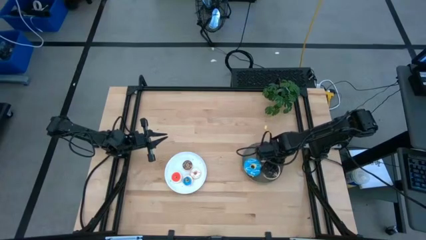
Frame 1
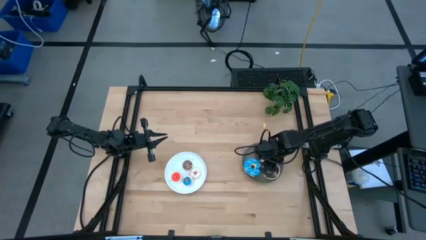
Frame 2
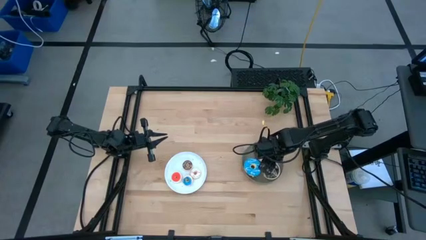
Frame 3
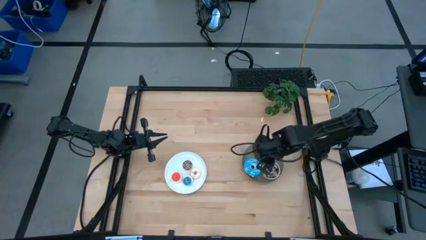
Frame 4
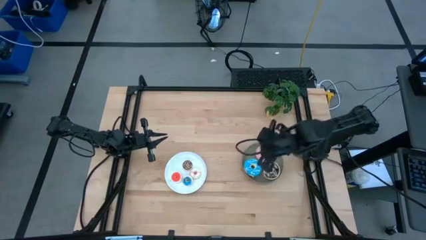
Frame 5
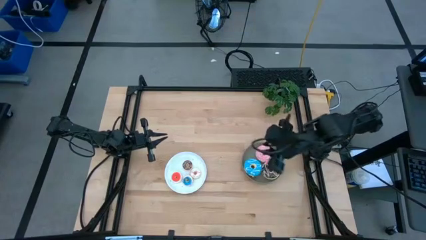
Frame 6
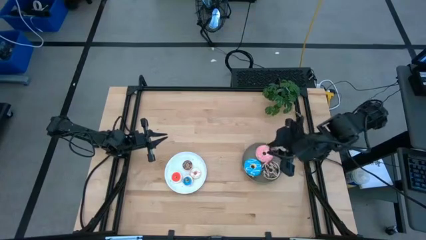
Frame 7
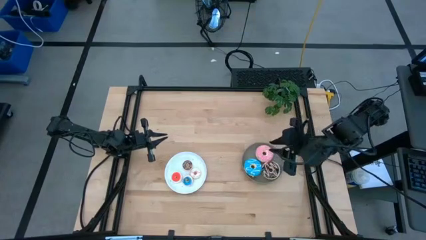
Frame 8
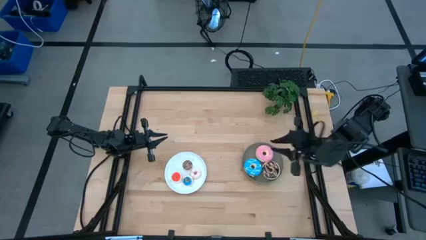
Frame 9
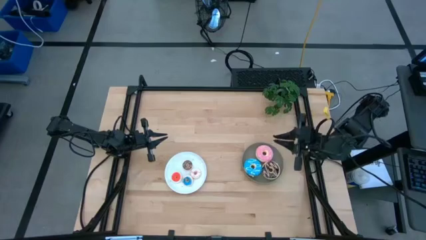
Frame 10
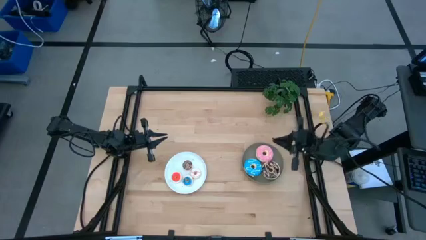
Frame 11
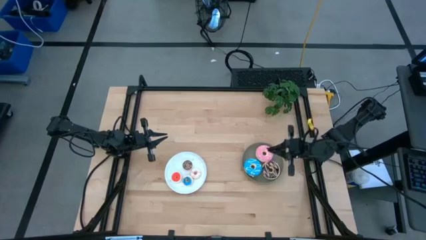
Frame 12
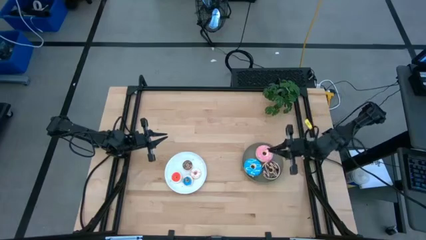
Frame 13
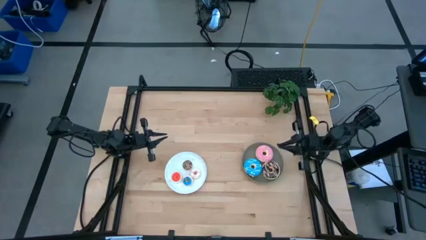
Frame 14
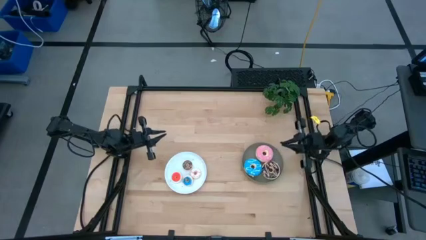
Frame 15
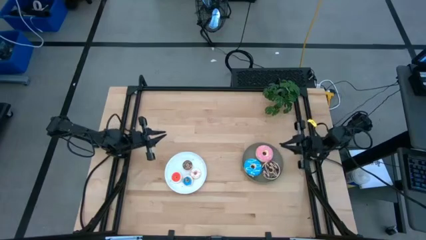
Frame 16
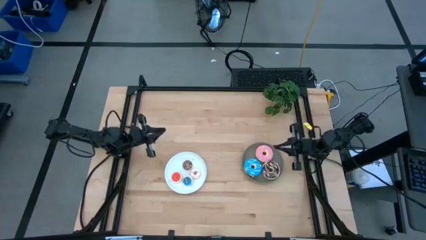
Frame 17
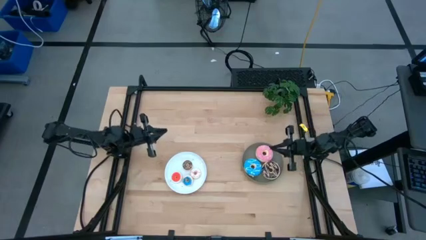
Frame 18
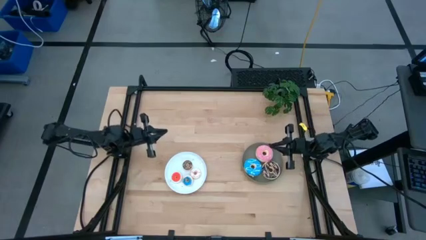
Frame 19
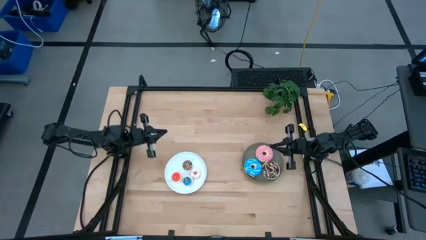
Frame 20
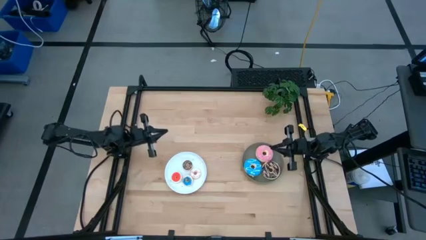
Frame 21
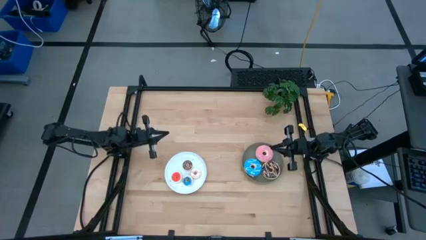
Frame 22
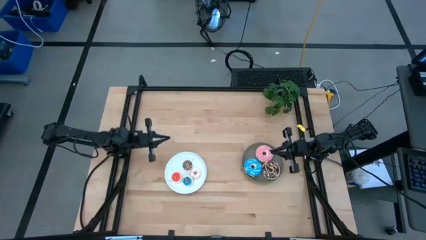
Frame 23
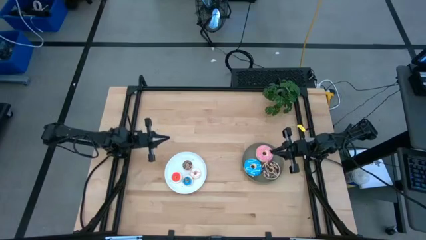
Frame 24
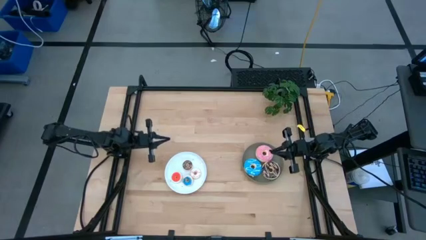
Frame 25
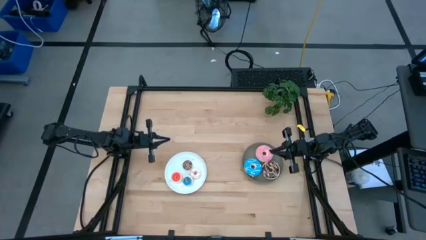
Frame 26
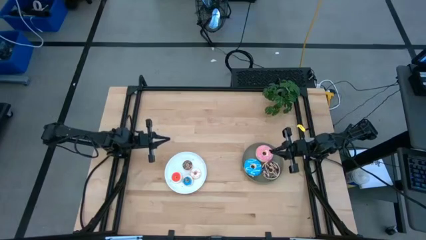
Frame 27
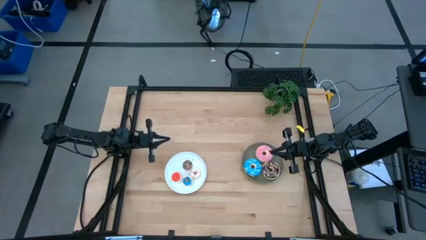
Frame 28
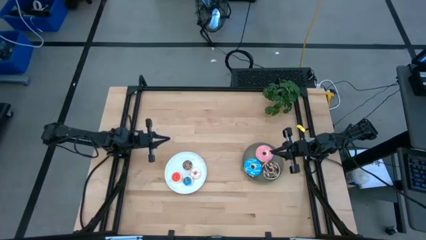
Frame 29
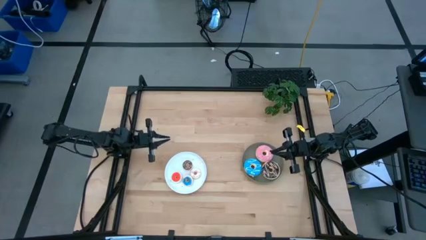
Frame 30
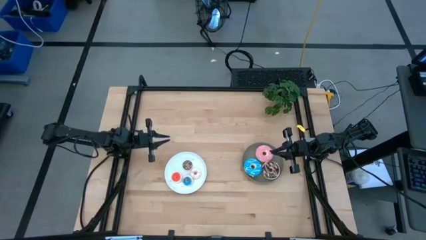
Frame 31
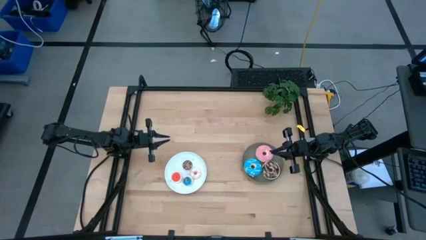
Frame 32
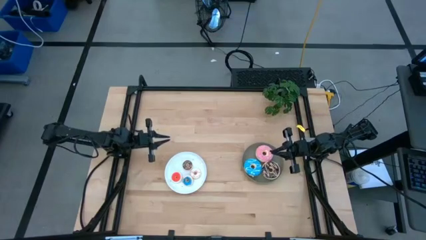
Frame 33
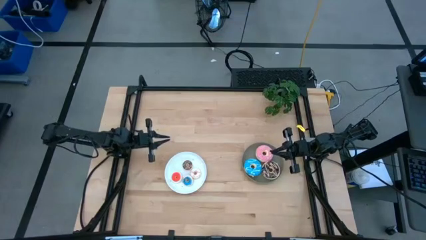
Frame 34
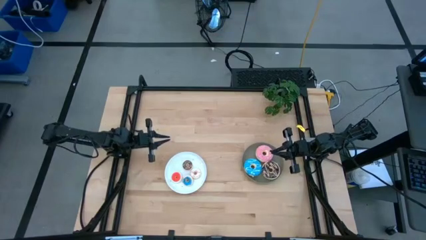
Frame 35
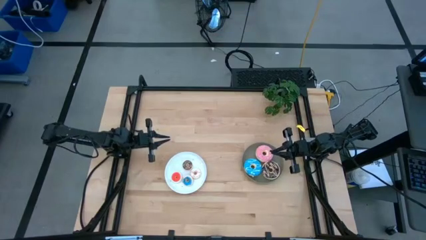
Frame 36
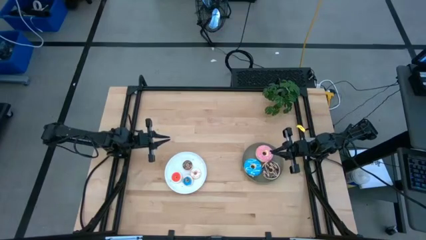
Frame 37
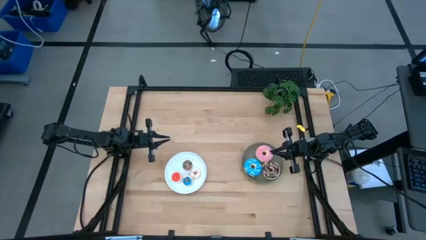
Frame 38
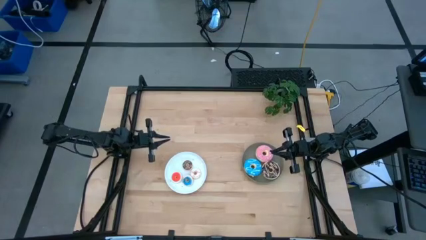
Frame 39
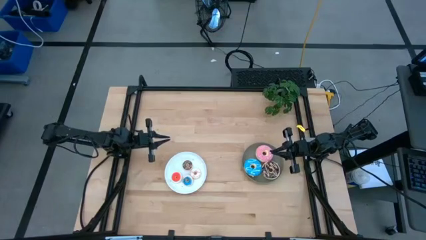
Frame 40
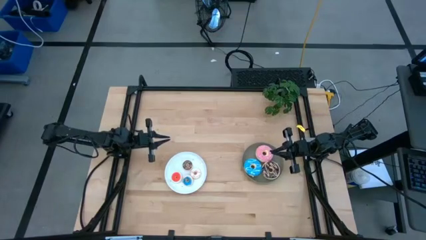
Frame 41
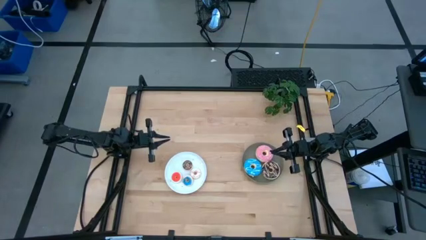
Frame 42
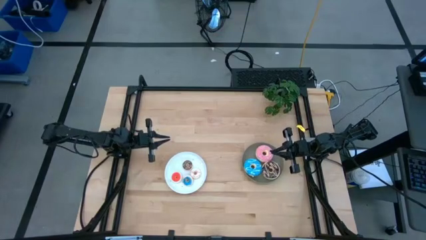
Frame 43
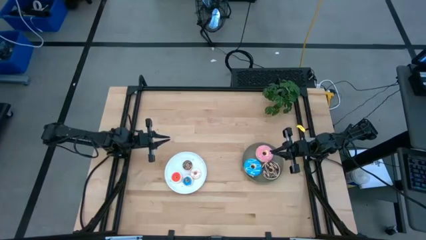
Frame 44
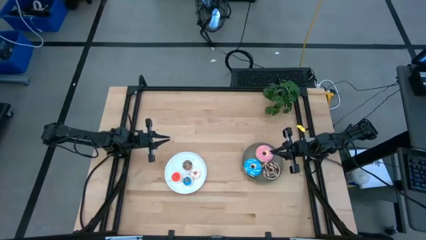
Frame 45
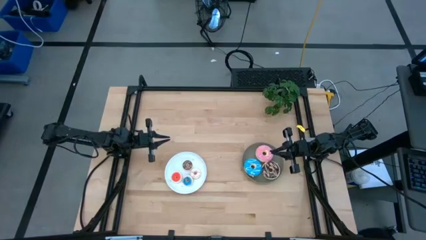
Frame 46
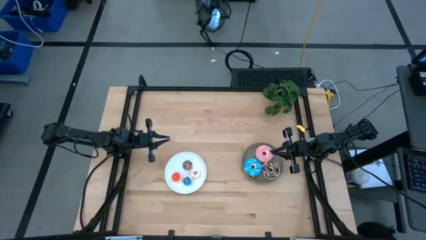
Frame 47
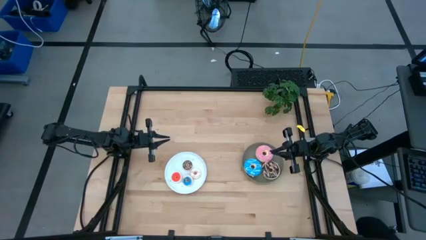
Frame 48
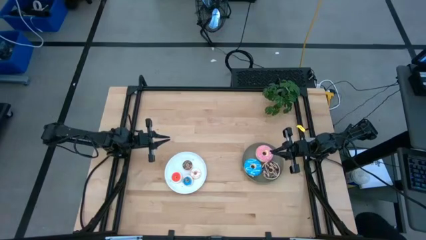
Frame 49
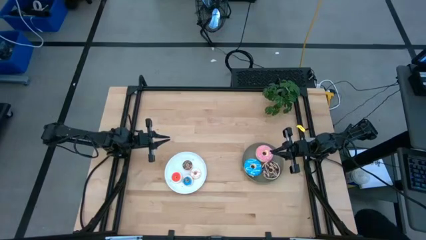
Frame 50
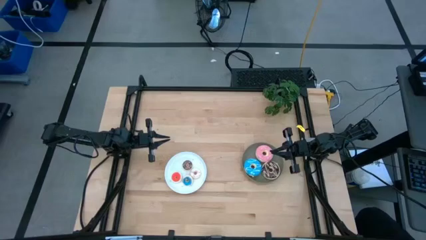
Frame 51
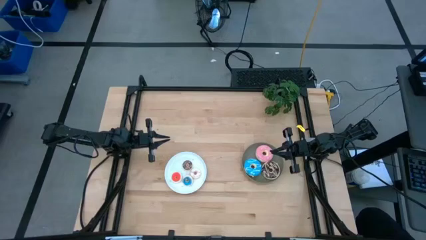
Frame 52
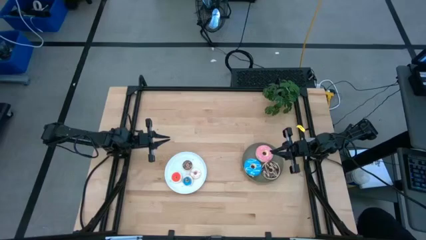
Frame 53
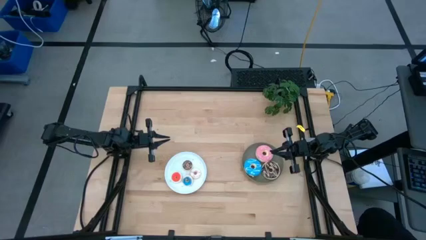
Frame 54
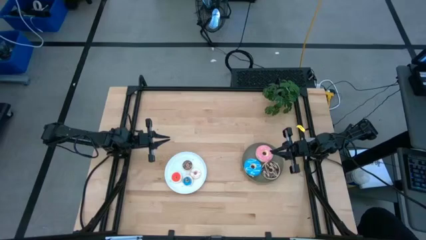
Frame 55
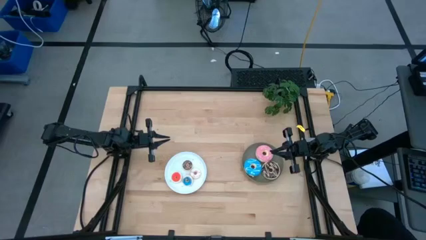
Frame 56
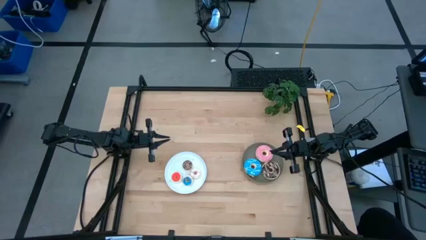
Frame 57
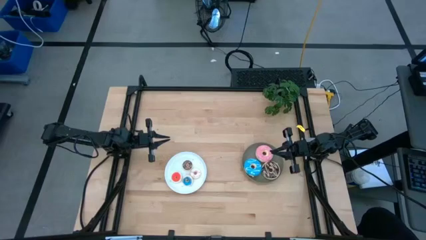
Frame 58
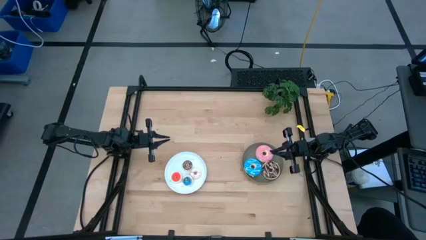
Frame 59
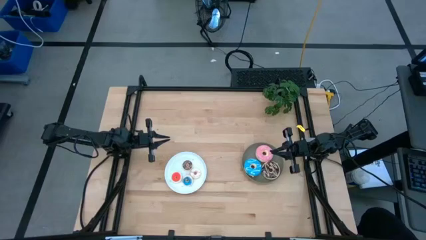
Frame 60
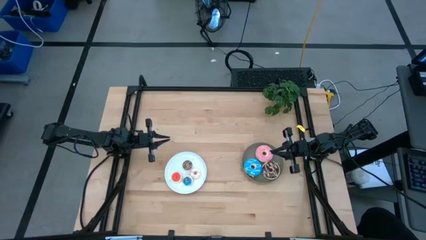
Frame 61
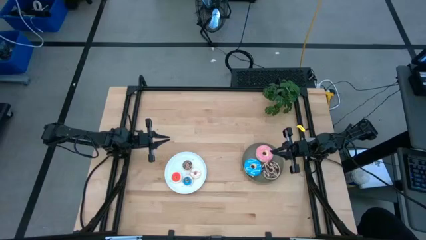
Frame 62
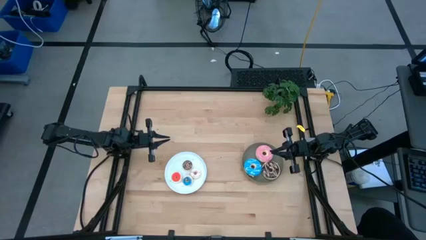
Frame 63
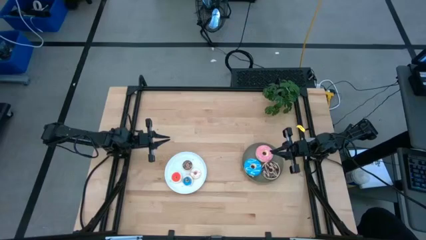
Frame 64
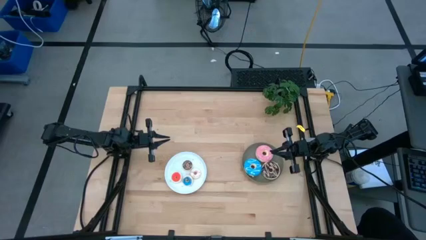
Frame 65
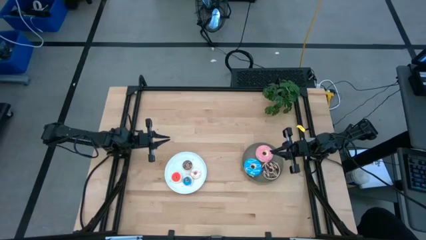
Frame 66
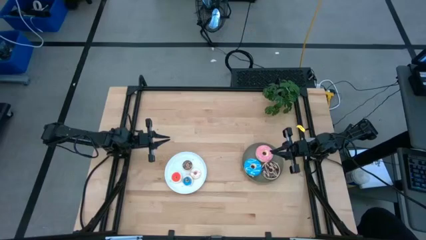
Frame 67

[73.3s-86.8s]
Task: Pick & Place donuts
Return to Home Position

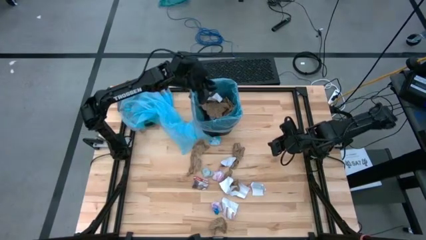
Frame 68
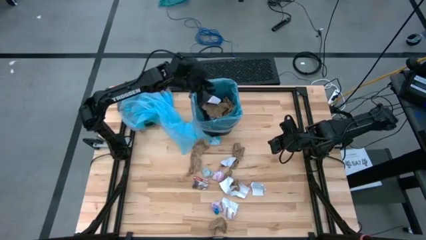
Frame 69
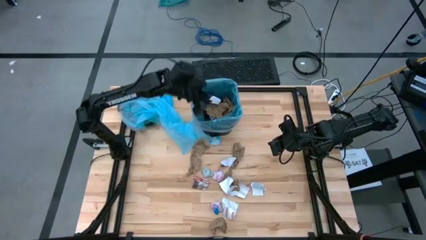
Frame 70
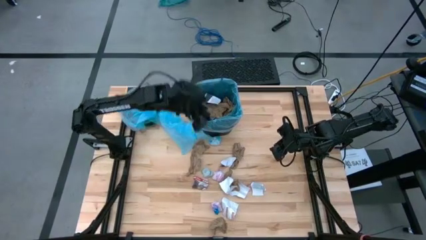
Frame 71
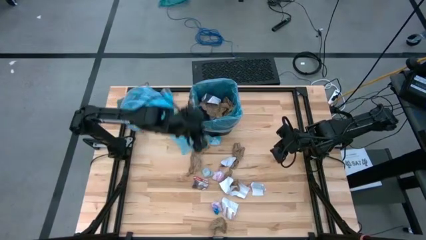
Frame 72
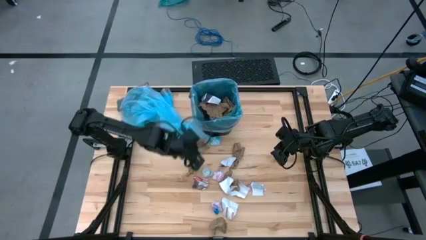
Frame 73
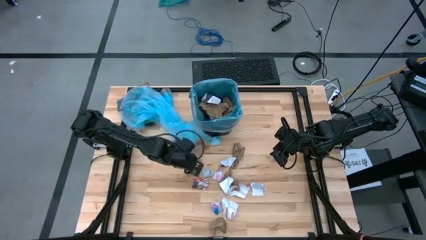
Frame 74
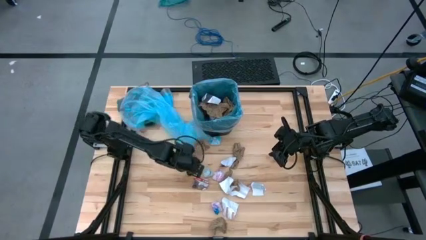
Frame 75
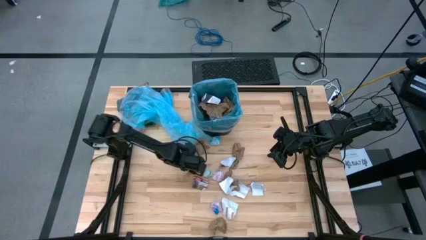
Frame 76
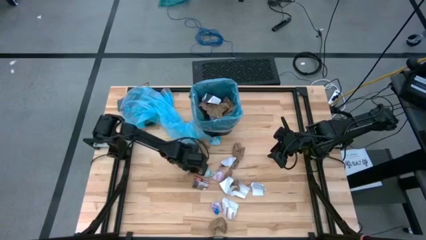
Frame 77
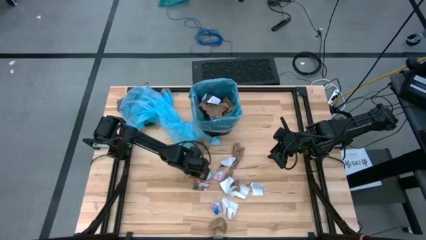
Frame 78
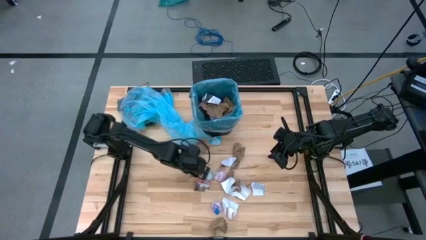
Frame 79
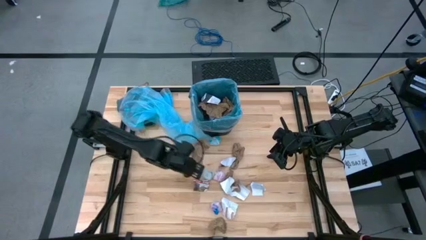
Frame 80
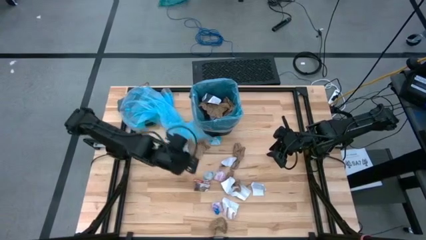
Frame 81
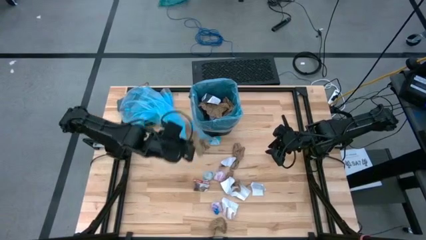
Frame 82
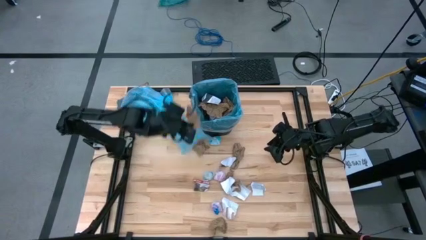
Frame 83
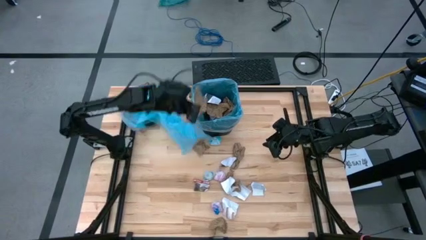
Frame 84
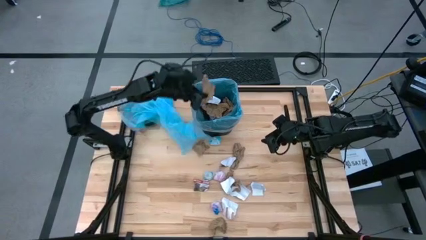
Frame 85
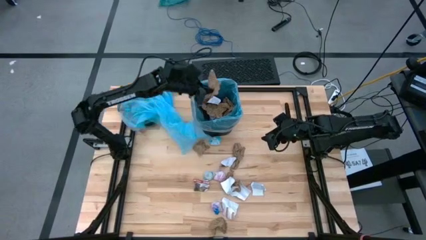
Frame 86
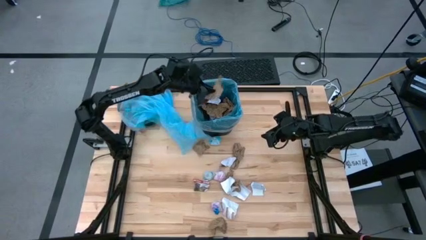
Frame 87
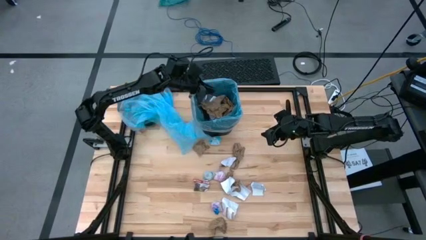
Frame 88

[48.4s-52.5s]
Task: place trash/remove bag and relplace
Put the brown paper into the trash bin
